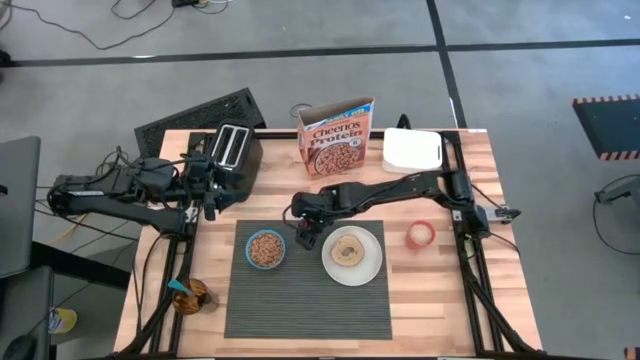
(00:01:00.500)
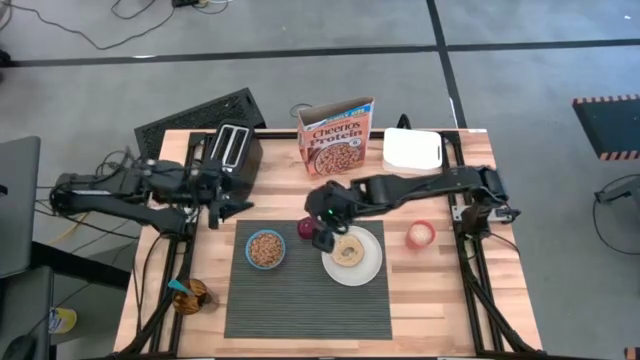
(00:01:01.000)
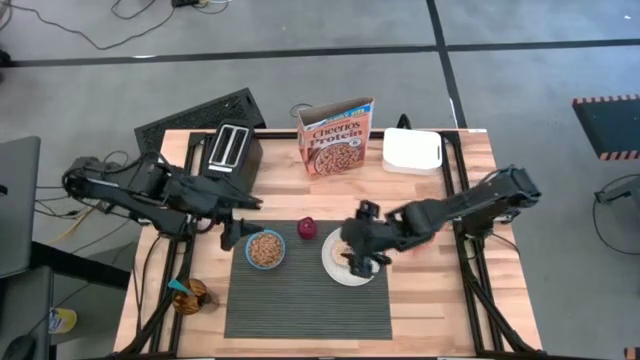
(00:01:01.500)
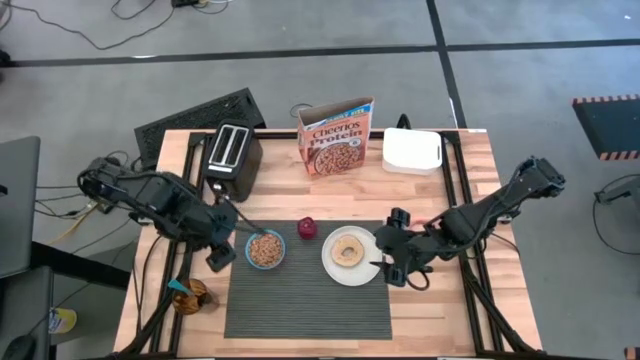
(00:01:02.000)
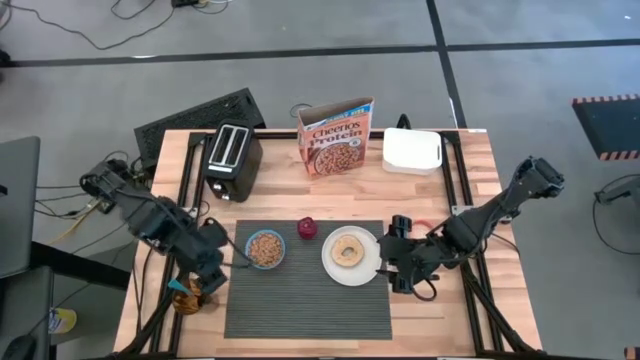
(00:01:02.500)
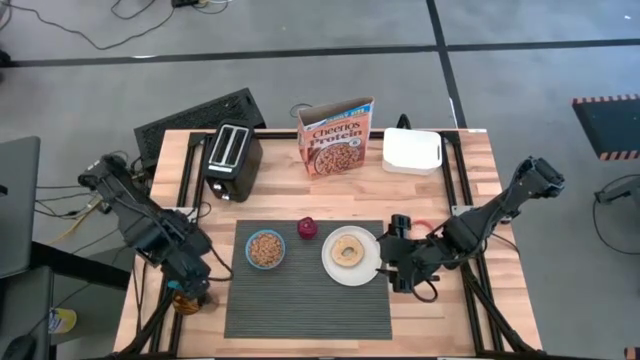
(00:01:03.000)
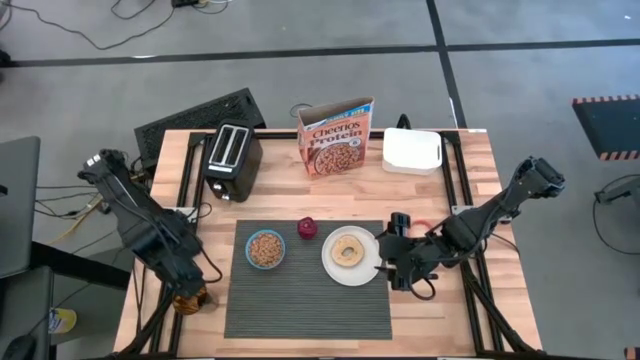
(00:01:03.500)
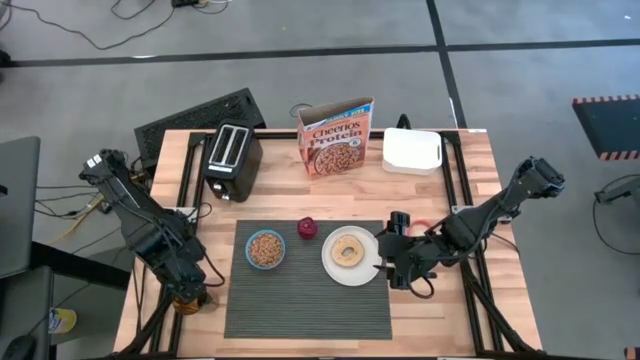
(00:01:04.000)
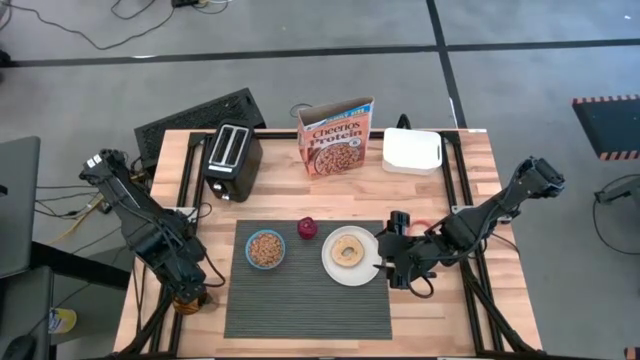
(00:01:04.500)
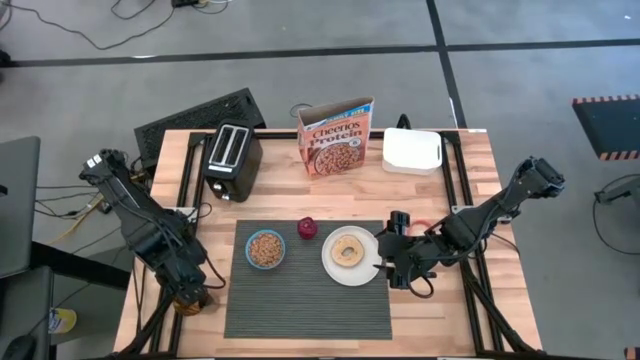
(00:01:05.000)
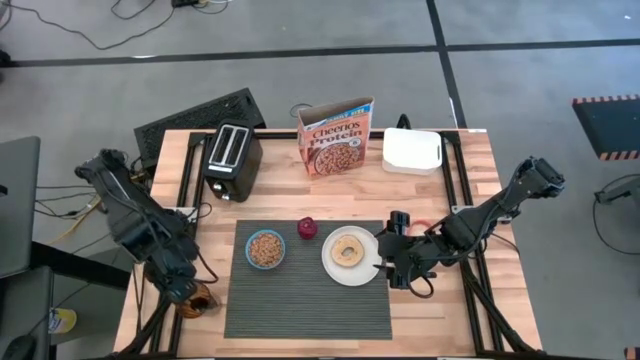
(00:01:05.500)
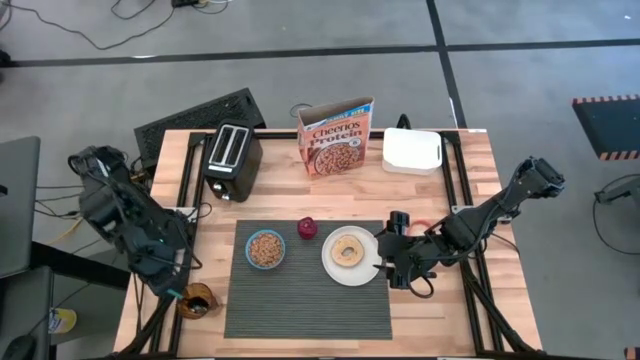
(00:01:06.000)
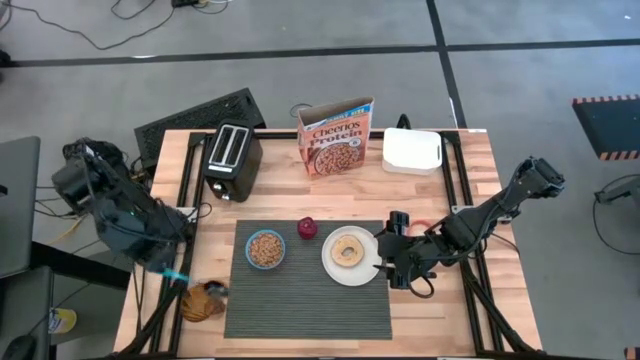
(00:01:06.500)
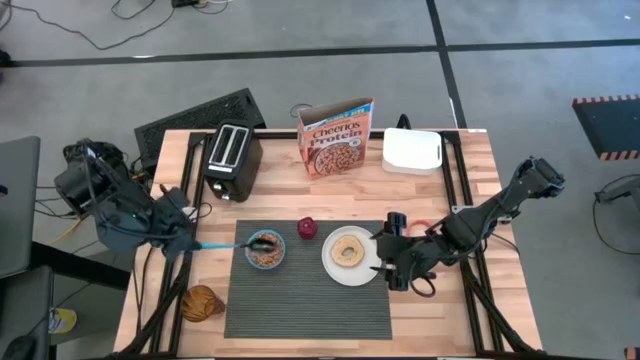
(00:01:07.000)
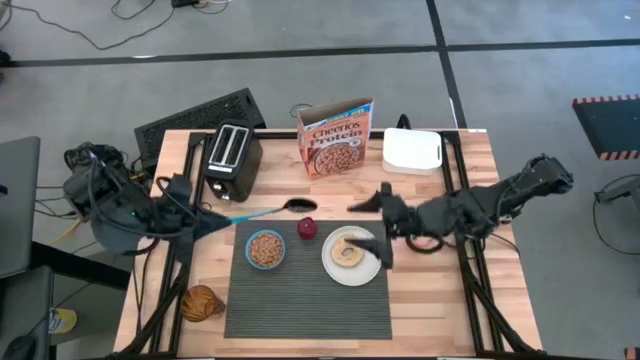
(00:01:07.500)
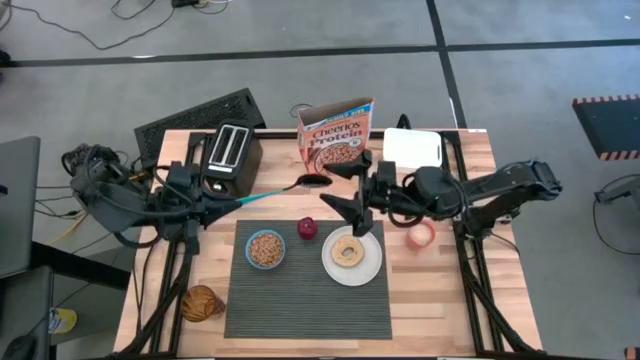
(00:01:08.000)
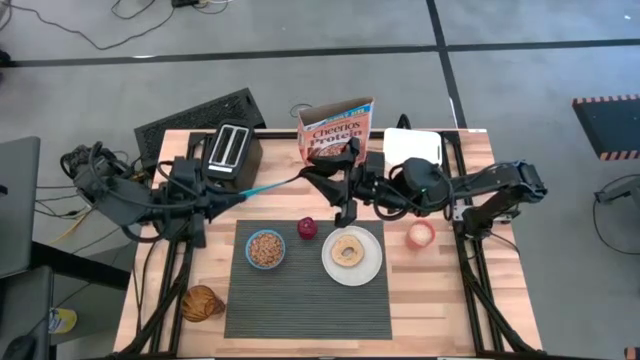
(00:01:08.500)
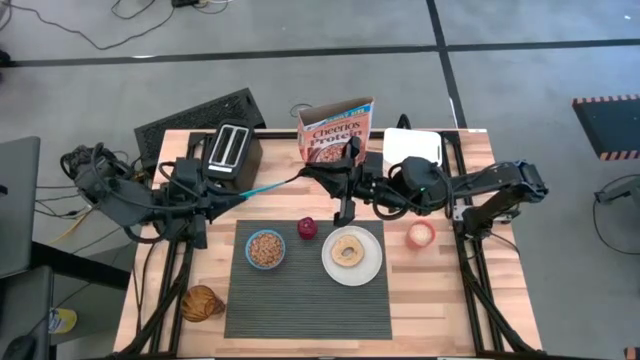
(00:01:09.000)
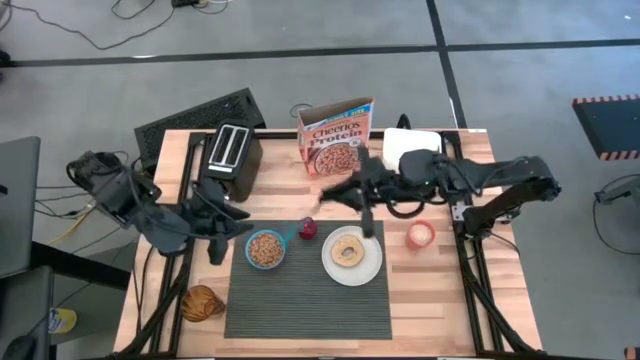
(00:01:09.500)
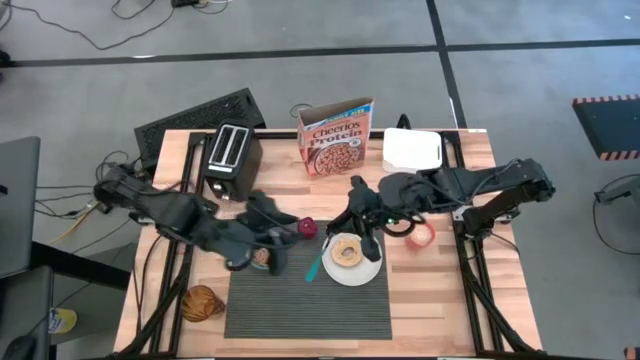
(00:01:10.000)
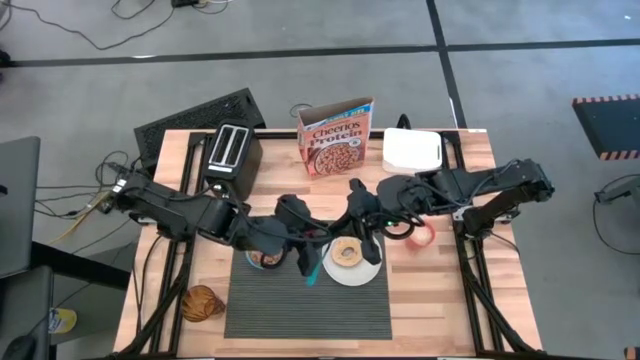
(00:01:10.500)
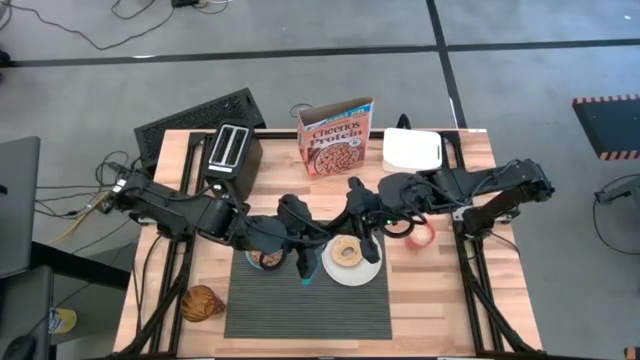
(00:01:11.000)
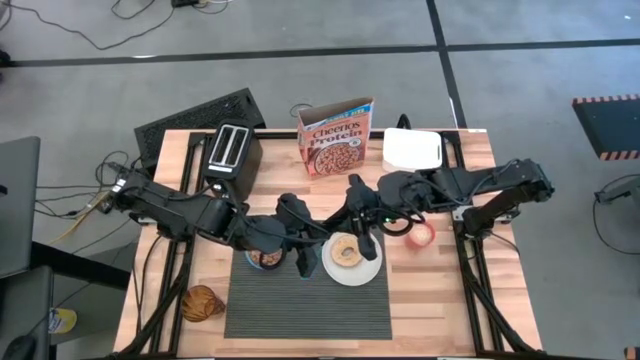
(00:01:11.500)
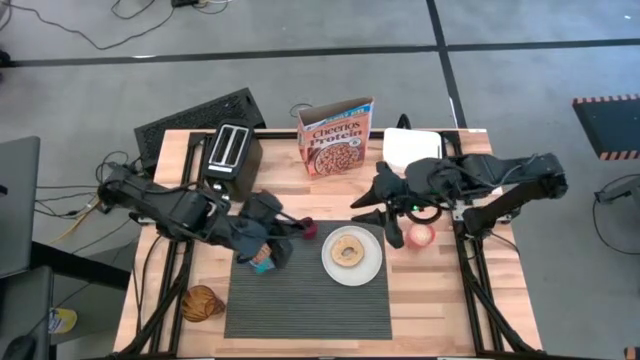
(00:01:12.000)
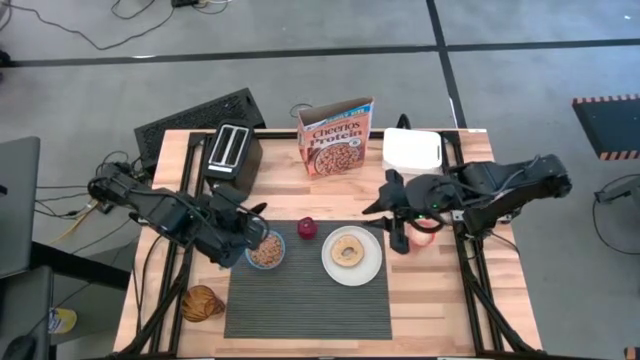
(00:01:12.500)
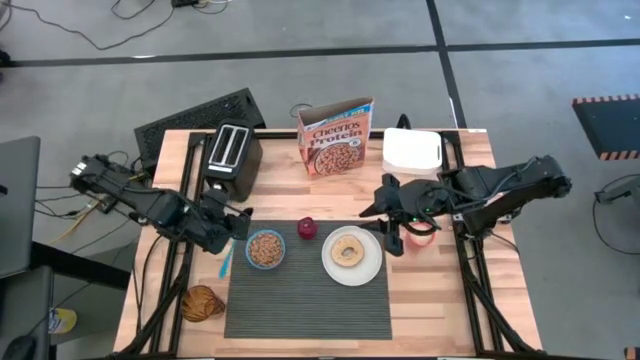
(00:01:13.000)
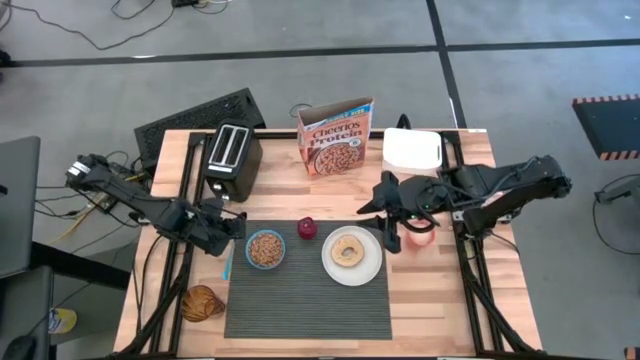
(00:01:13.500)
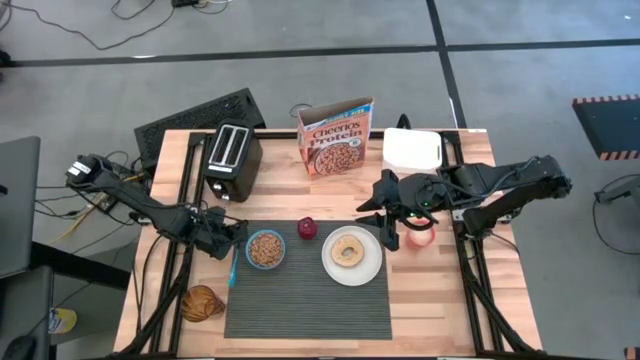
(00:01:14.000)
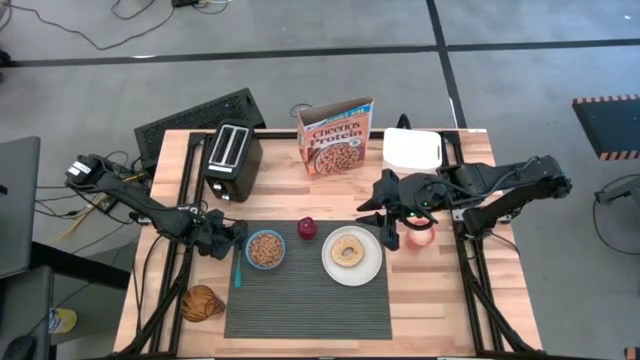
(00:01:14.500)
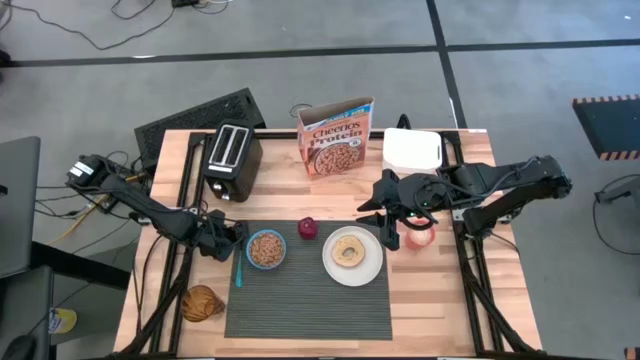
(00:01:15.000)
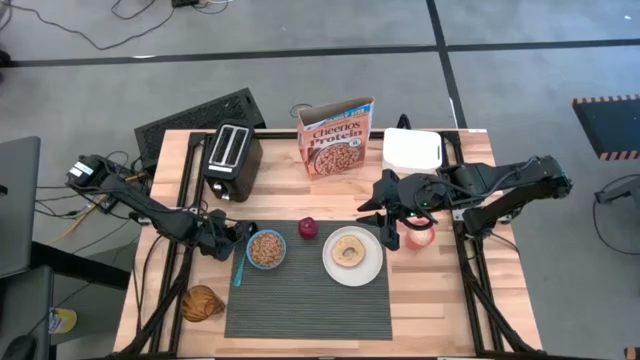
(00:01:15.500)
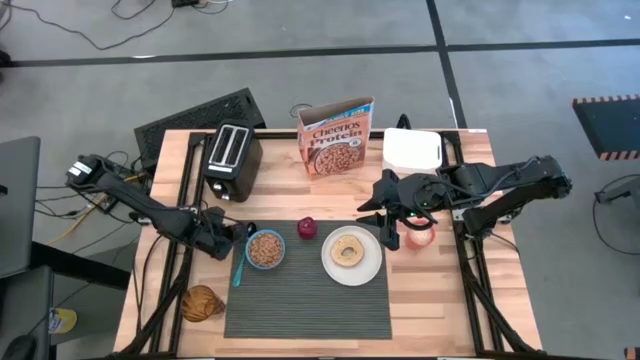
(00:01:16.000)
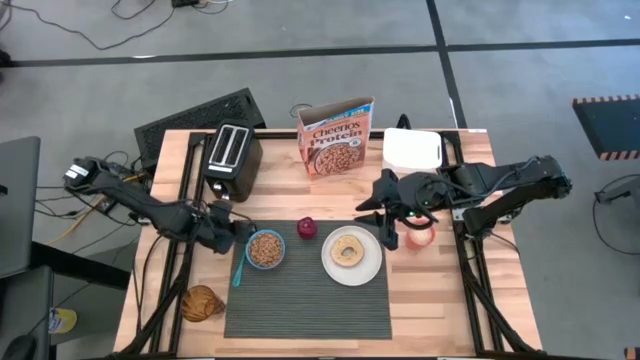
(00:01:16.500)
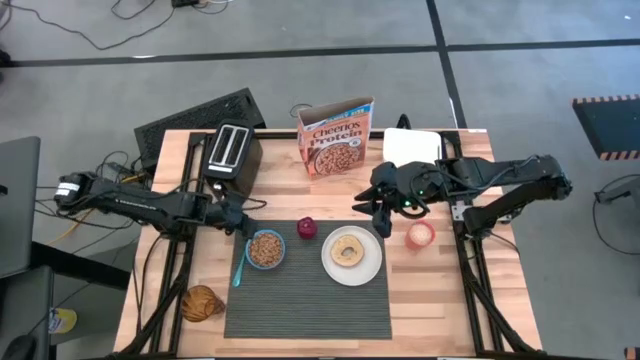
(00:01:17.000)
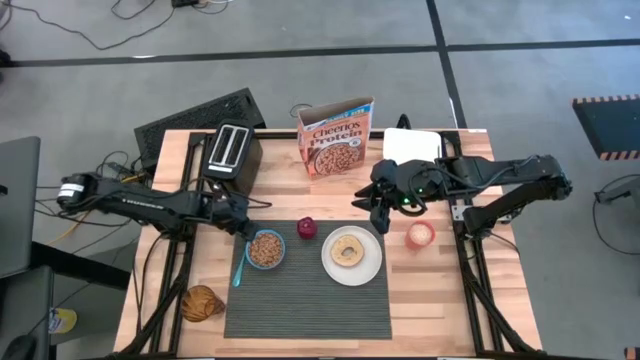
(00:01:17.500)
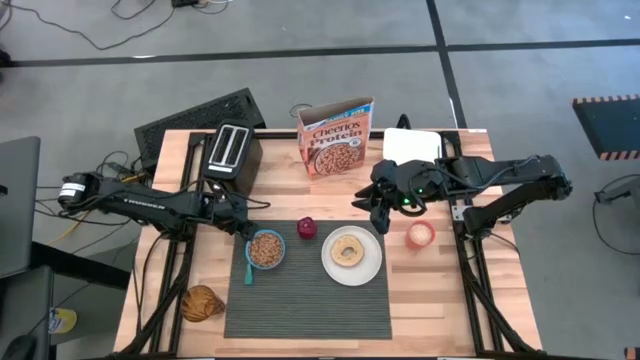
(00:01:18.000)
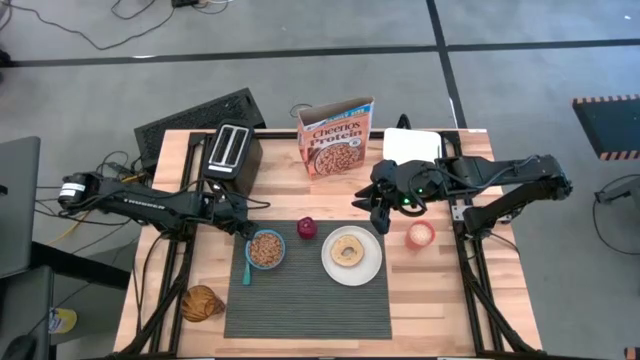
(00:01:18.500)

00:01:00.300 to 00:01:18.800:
Task: Arrange a breakfast setting
Put the blue spoon beside the blue bowl

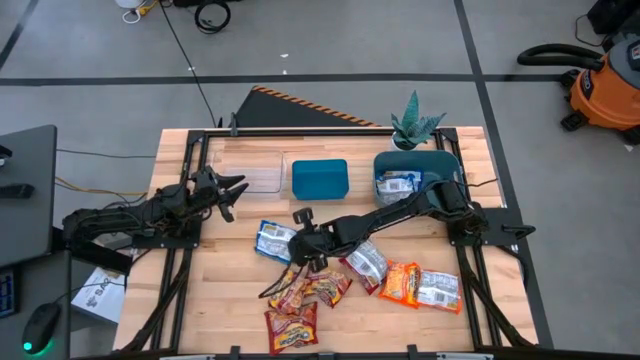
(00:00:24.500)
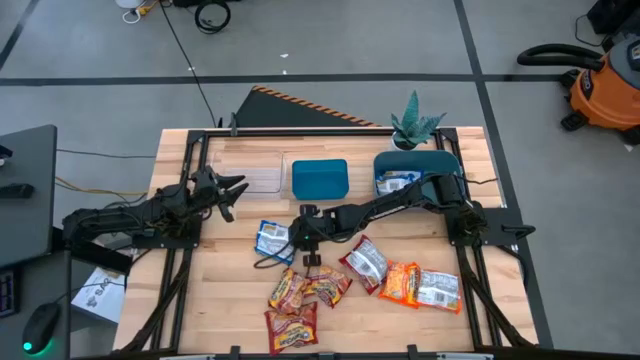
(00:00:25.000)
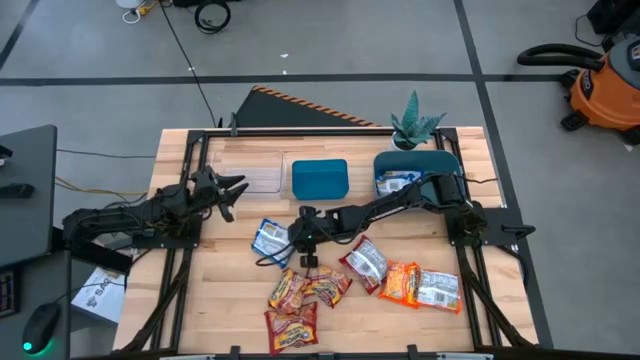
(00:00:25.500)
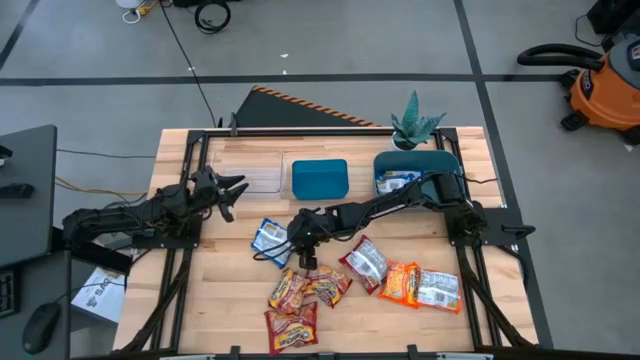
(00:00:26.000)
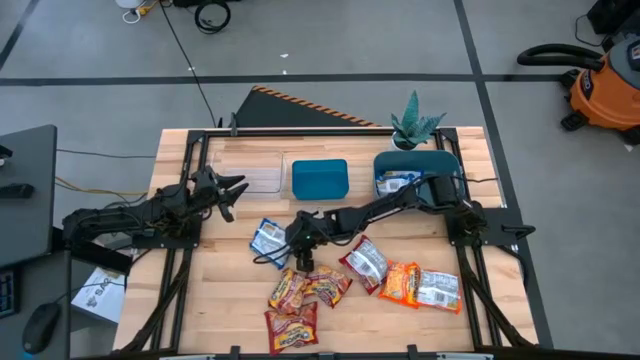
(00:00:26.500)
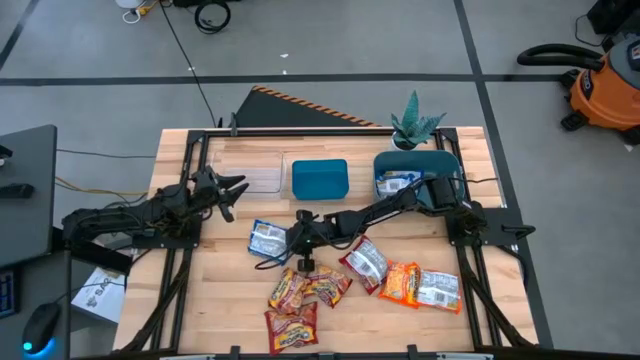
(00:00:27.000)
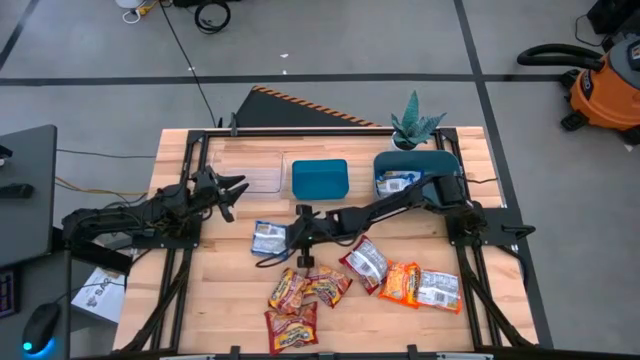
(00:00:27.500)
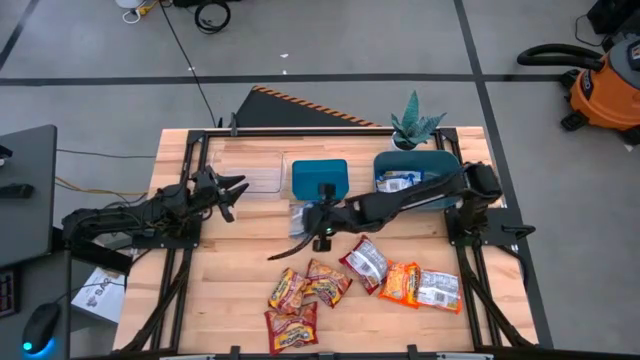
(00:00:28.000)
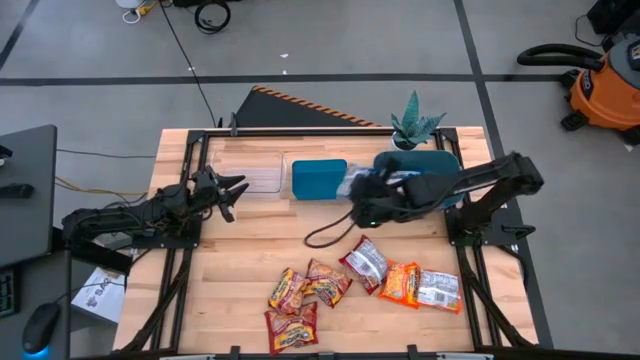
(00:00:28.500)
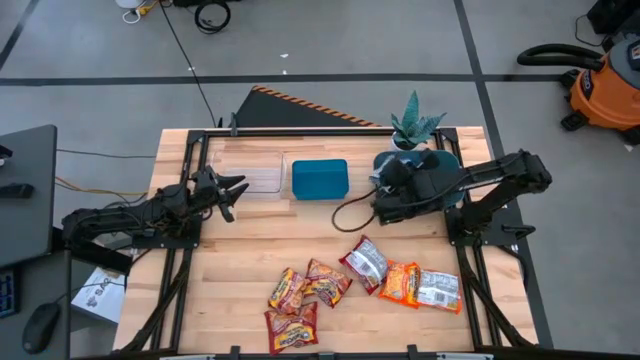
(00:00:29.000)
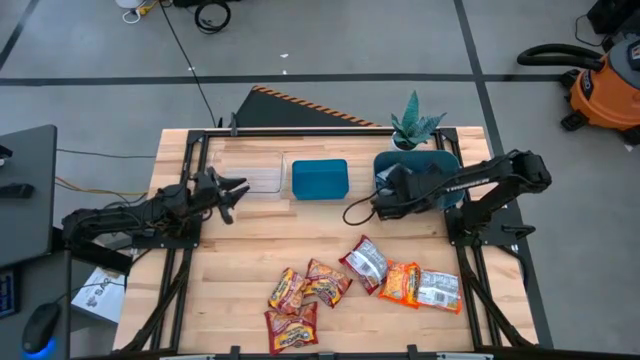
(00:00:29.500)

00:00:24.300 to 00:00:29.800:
Task: Sort Maruchan noodles
Put the blue noodle pack into the green bin
